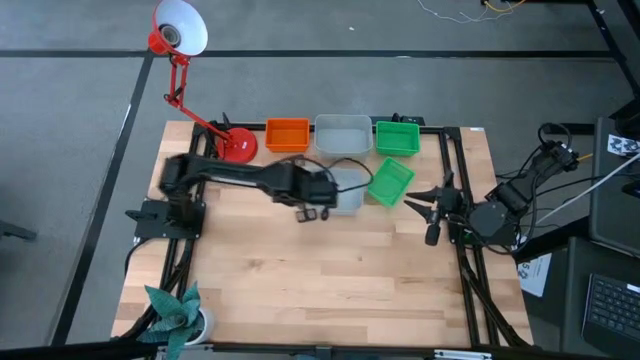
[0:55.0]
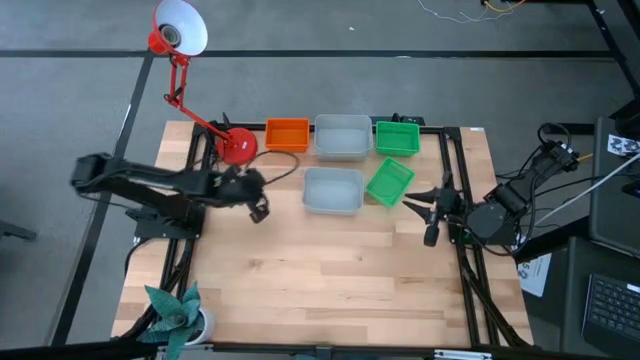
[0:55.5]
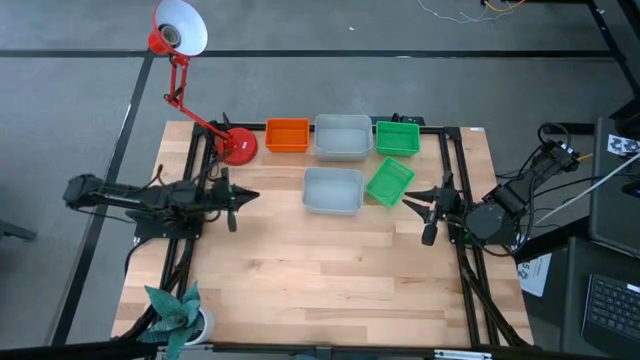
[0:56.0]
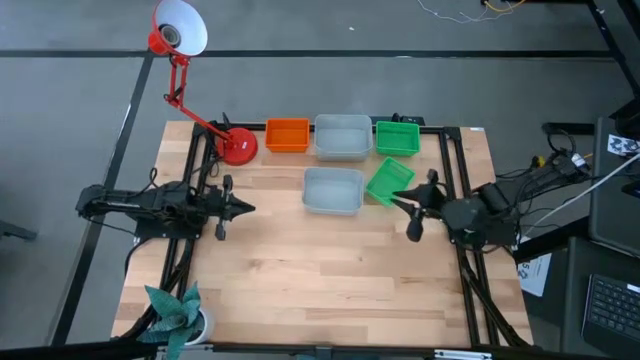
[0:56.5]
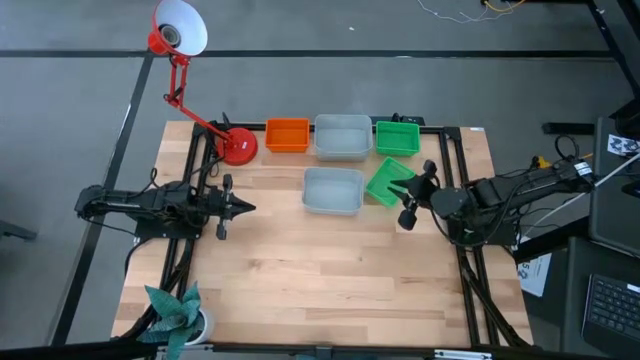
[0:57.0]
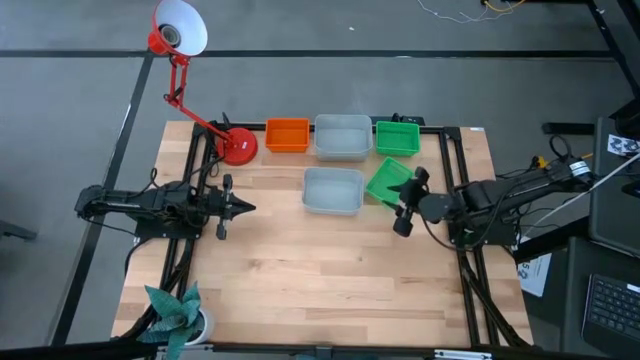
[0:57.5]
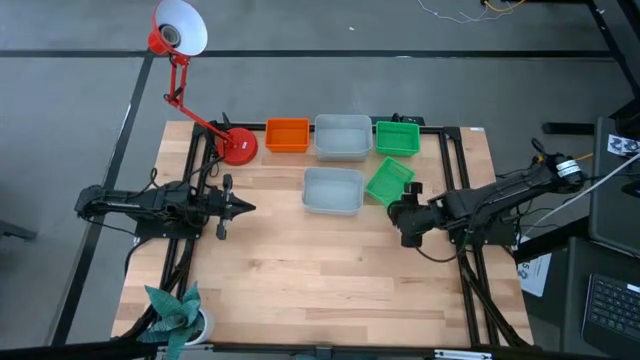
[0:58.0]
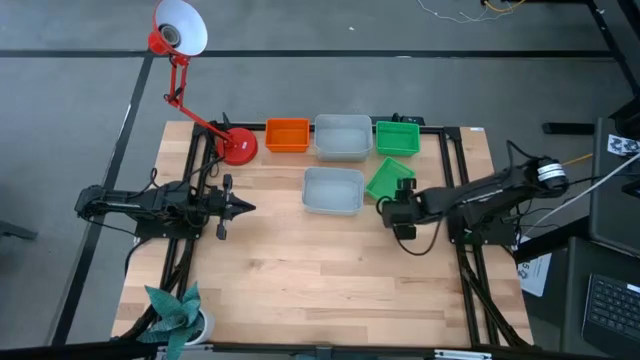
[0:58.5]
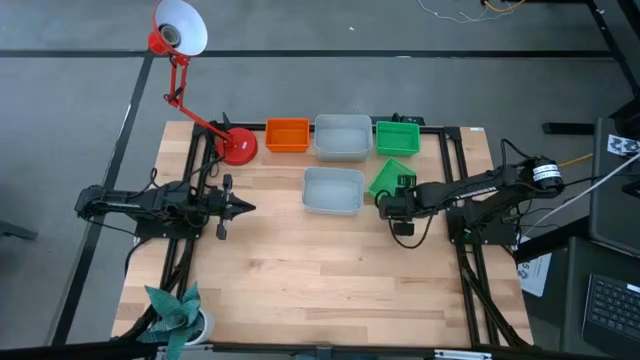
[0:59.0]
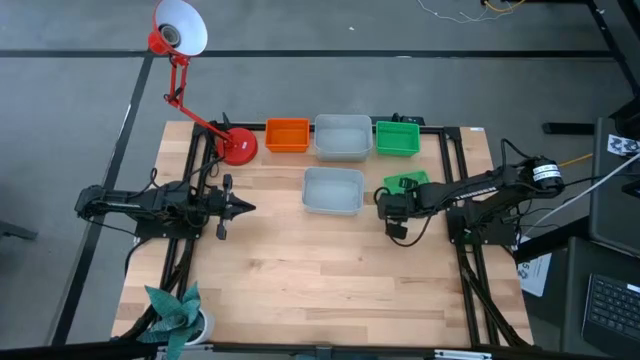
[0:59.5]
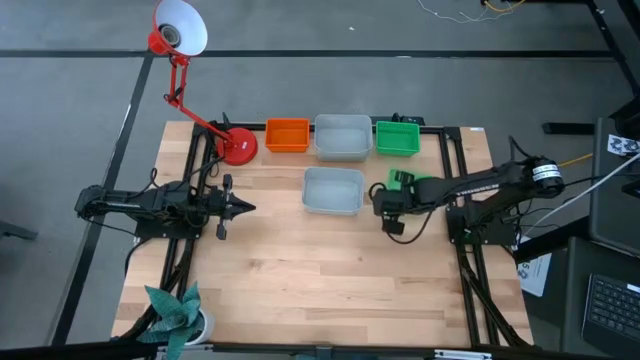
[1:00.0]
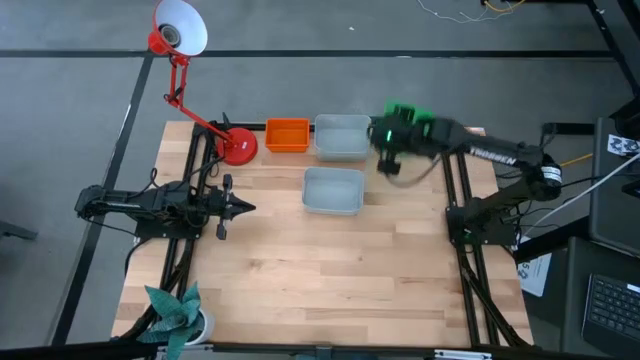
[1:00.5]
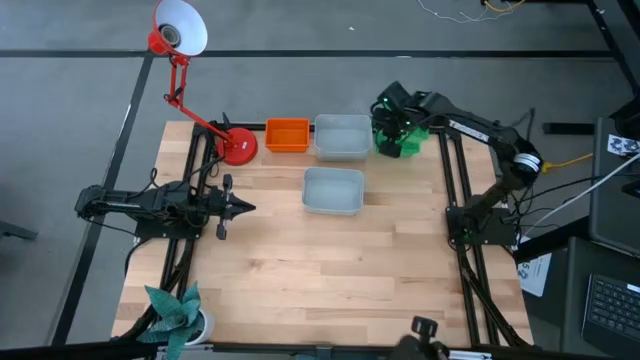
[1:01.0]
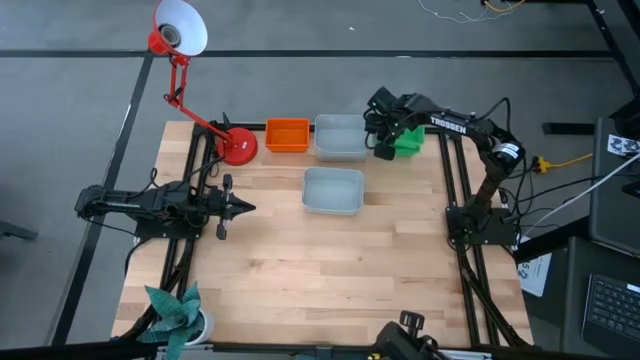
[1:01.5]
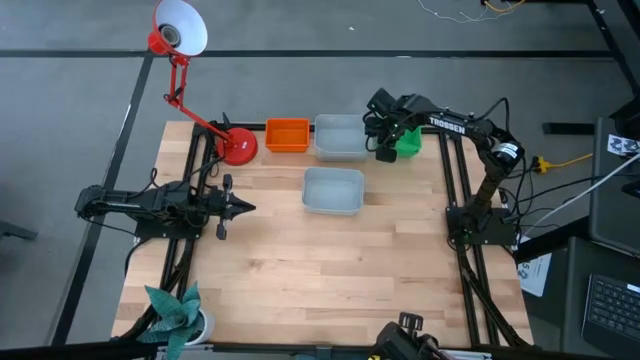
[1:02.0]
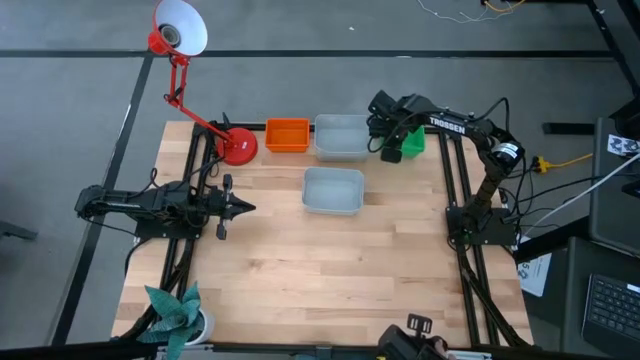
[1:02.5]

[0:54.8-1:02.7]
Stack the bottom green bin on the top stacked green bin

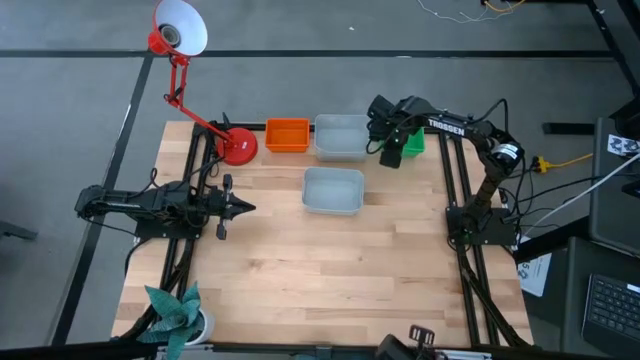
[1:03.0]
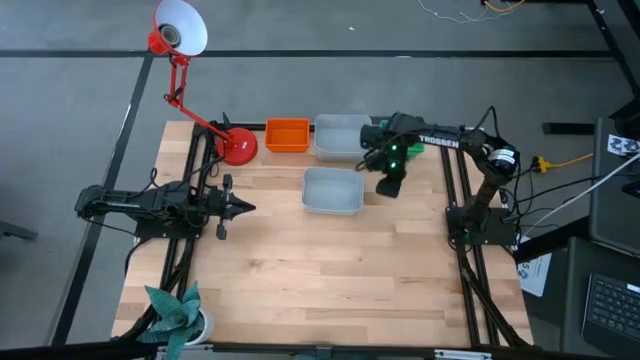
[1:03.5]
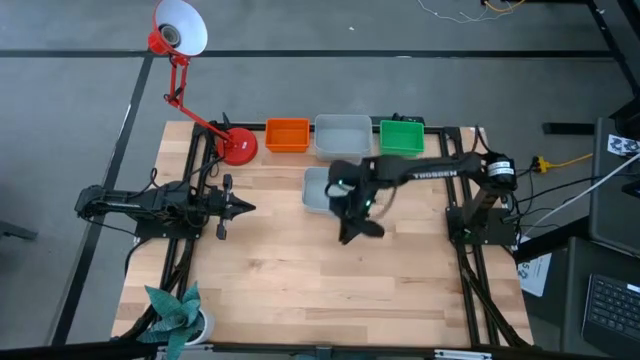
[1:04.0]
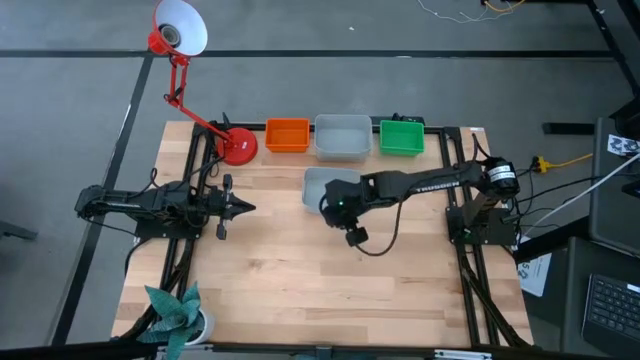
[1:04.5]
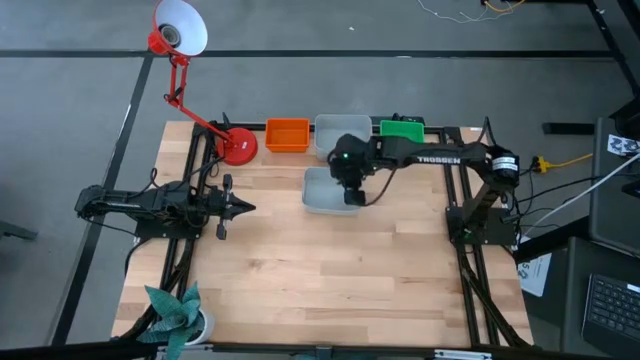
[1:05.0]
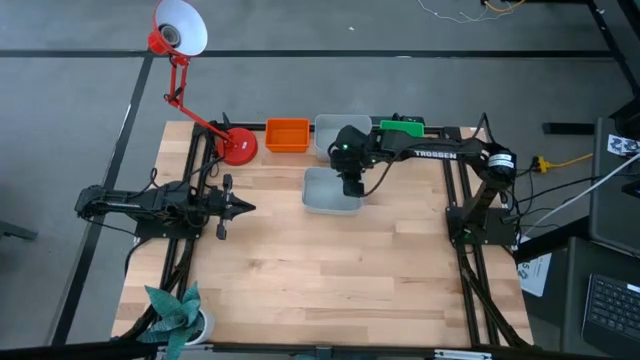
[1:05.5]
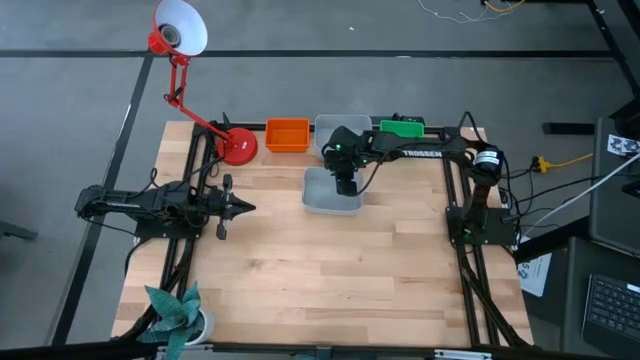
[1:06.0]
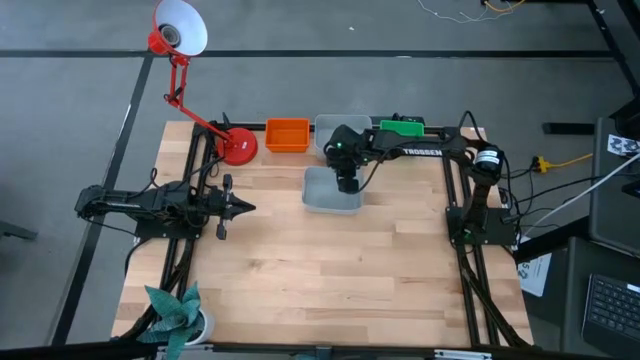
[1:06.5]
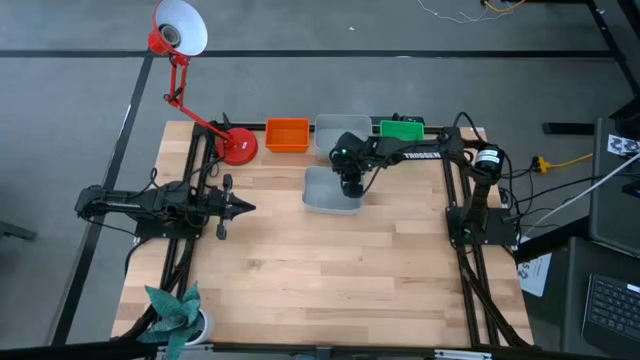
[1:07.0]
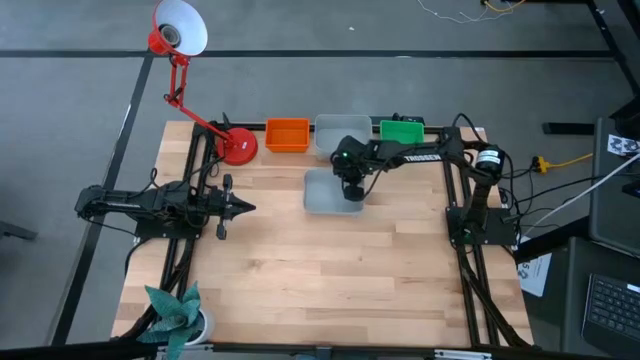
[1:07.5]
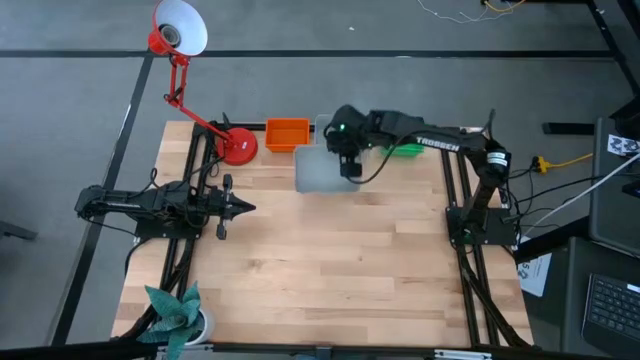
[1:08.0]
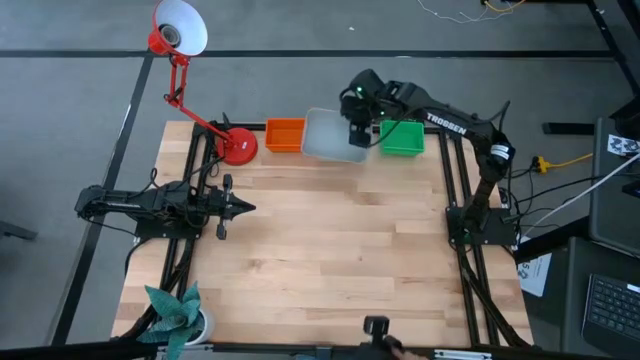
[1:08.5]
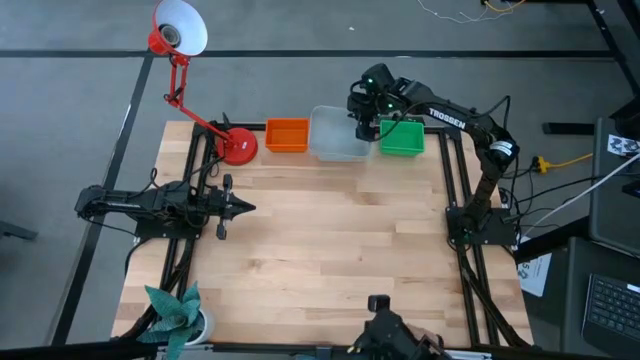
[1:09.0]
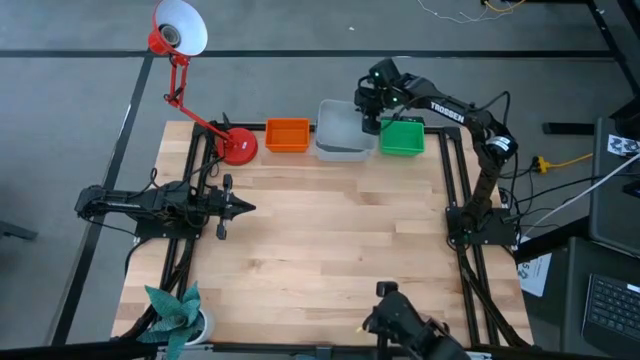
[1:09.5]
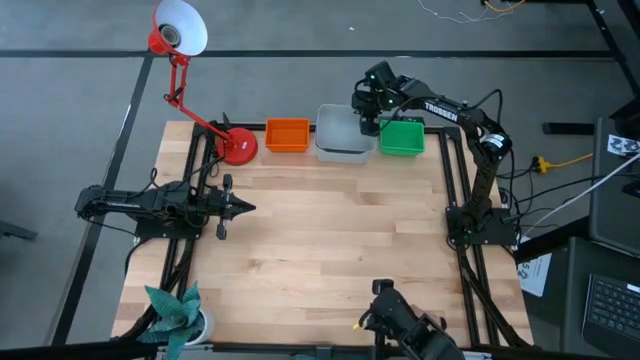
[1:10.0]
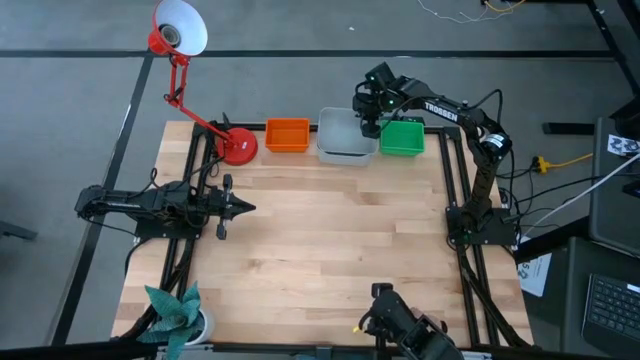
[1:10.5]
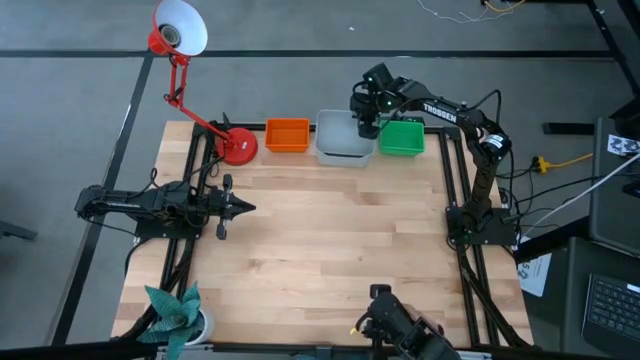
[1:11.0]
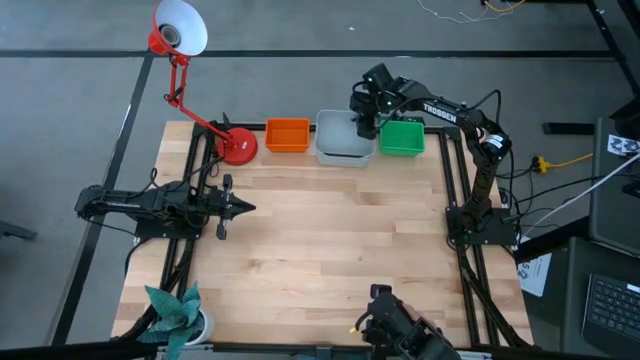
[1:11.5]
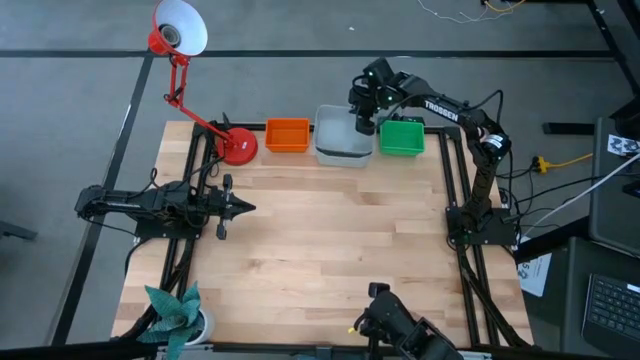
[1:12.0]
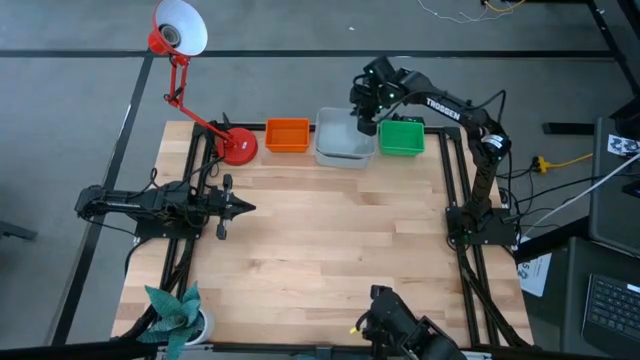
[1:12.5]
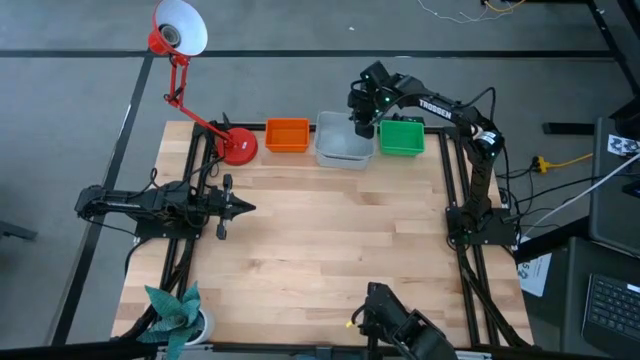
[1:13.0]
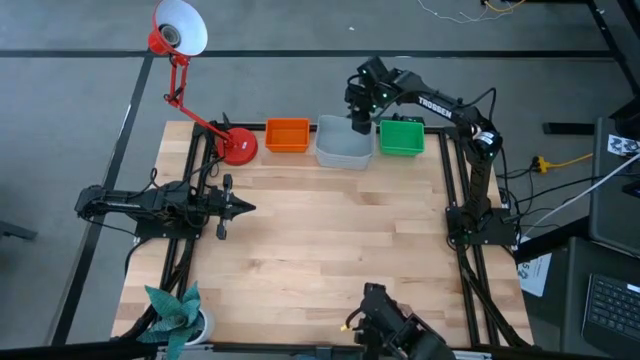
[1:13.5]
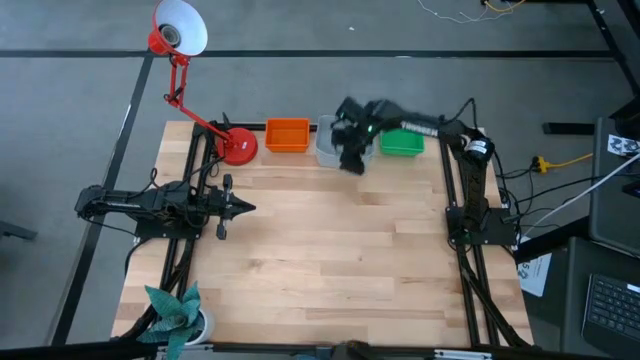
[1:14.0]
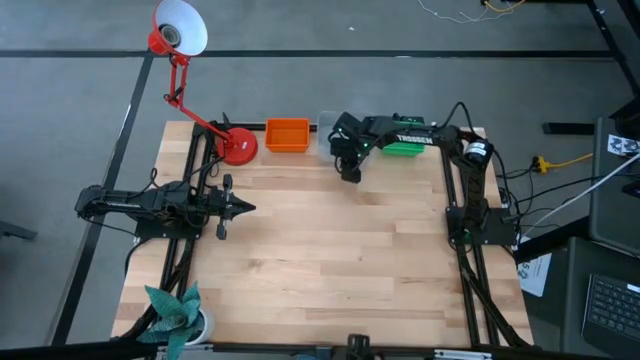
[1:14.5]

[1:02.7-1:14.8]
Stack the bottom gray bin on the top stacked gray bin

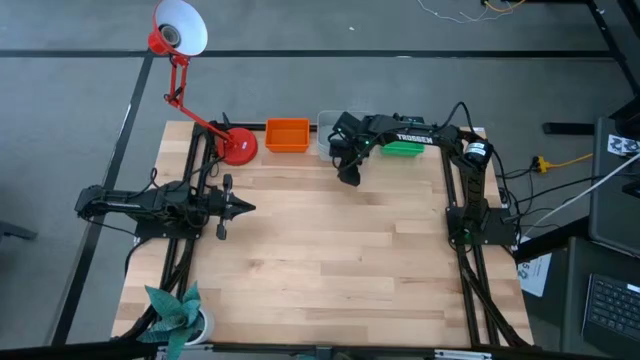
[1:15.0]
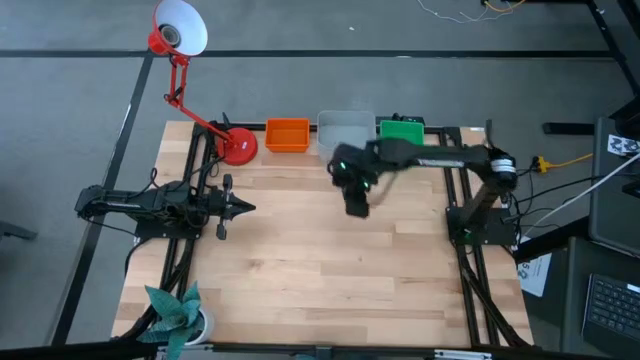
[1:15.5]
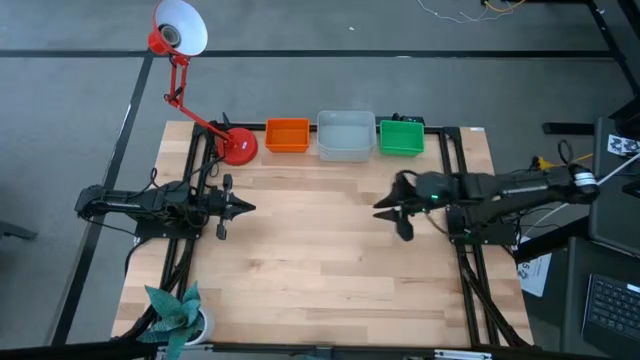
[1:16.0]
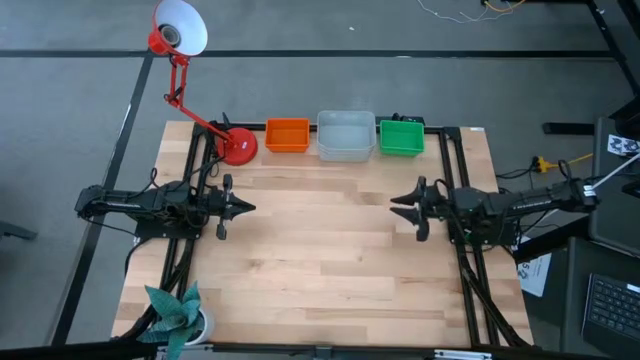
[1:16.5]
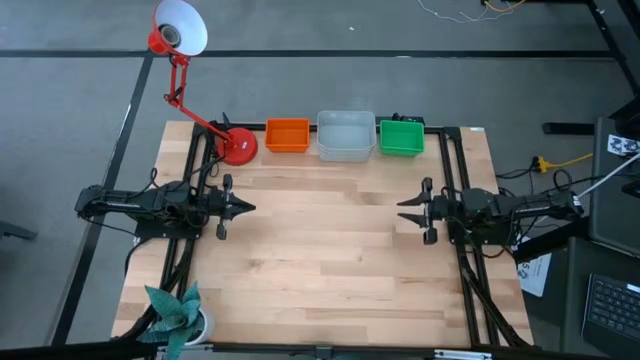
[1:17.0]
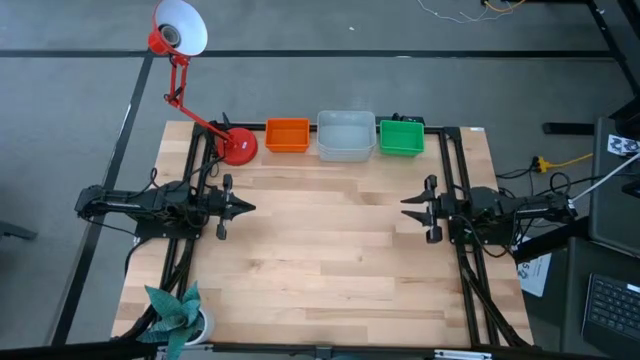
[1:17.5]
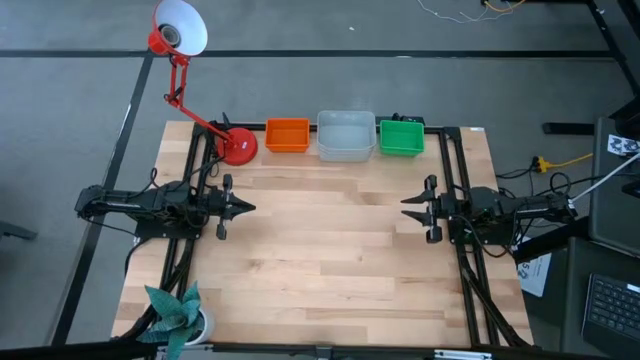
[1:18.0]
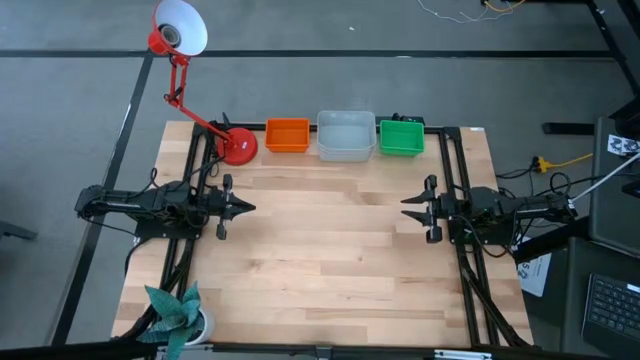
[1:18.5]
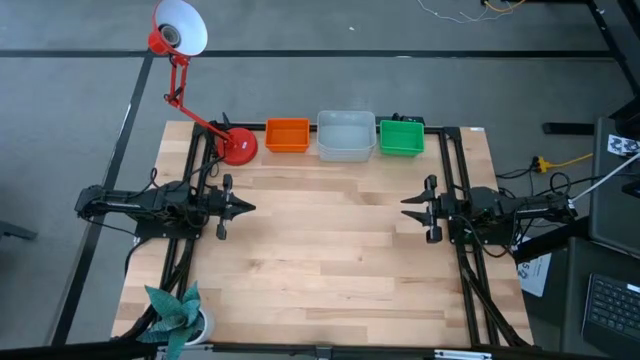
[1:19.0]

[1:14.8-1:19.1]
Return to Home Position
